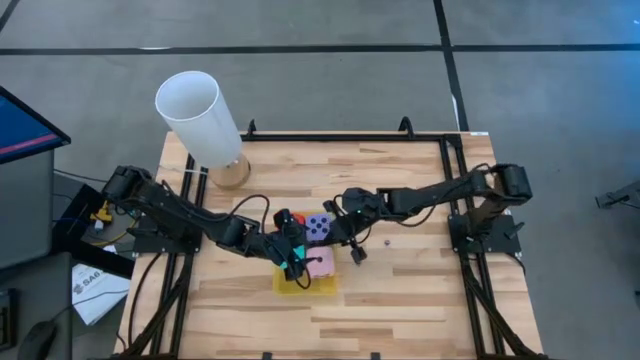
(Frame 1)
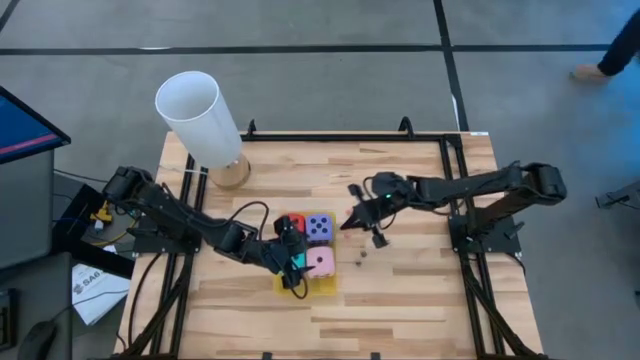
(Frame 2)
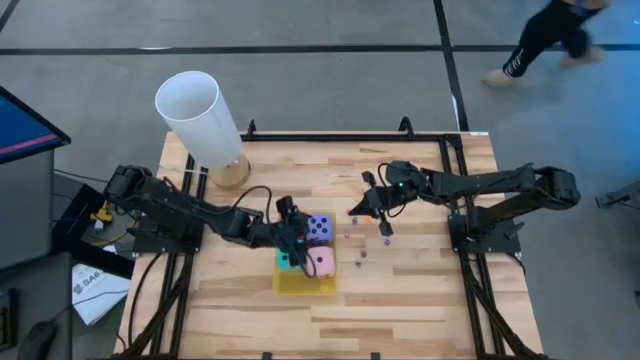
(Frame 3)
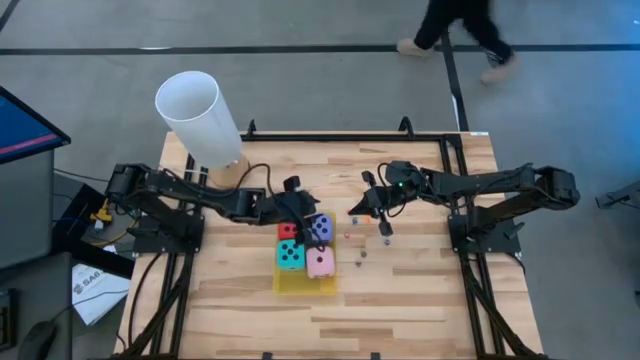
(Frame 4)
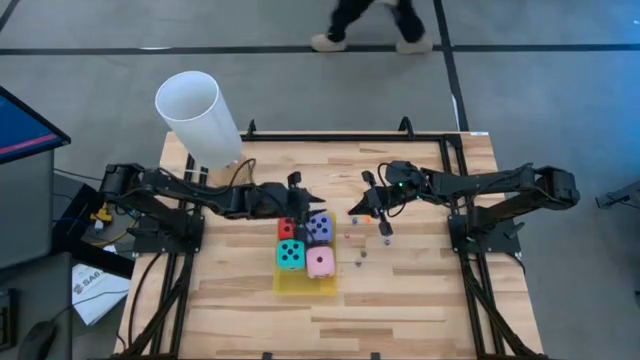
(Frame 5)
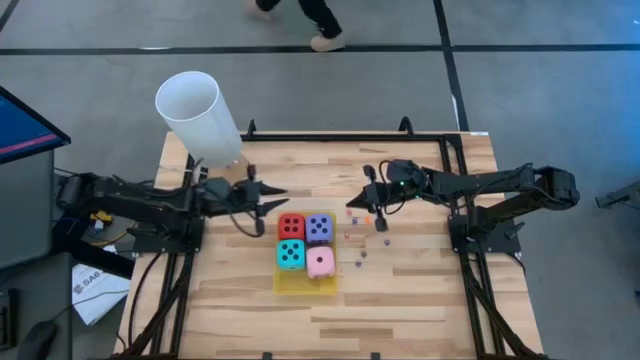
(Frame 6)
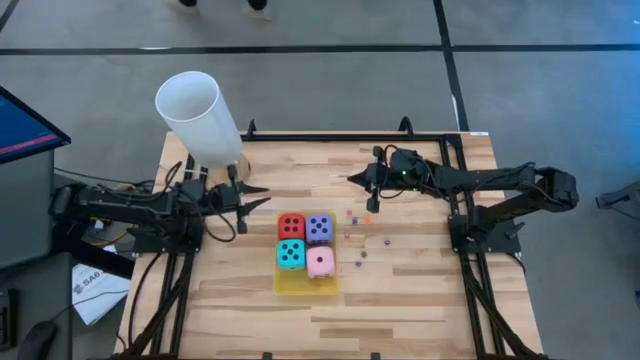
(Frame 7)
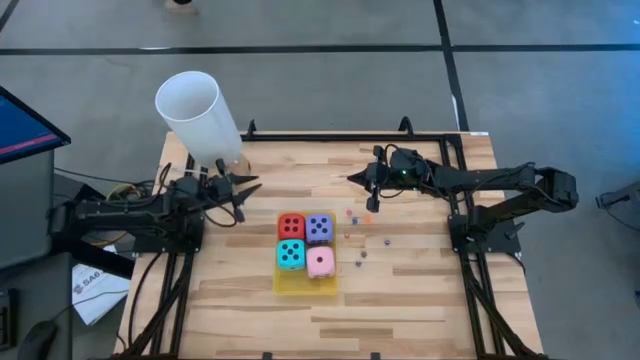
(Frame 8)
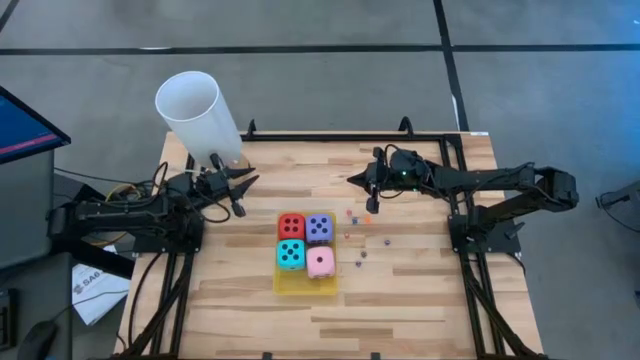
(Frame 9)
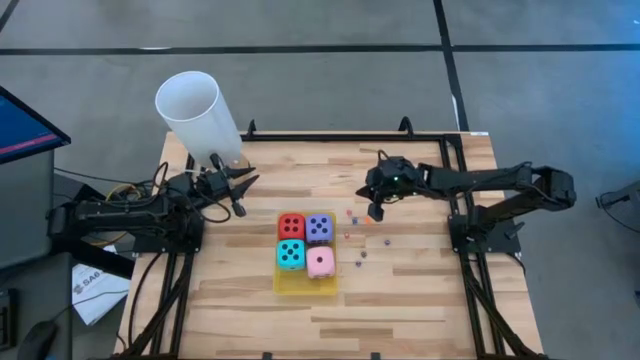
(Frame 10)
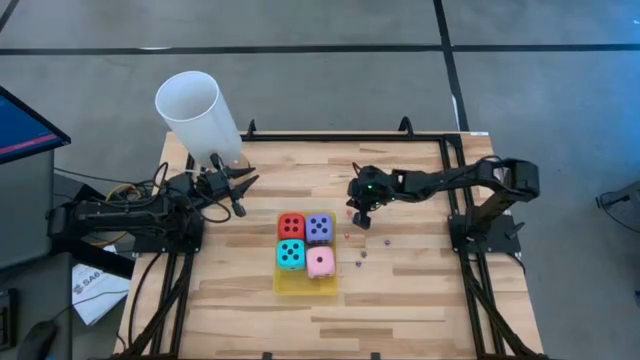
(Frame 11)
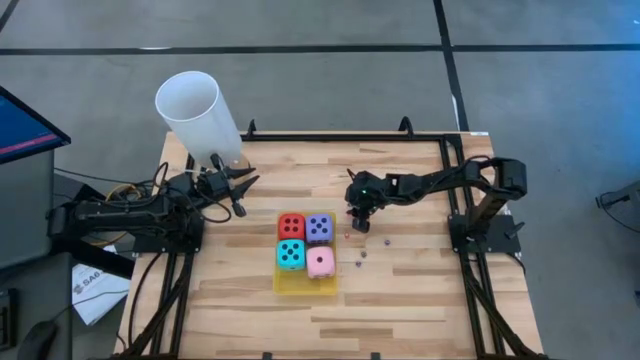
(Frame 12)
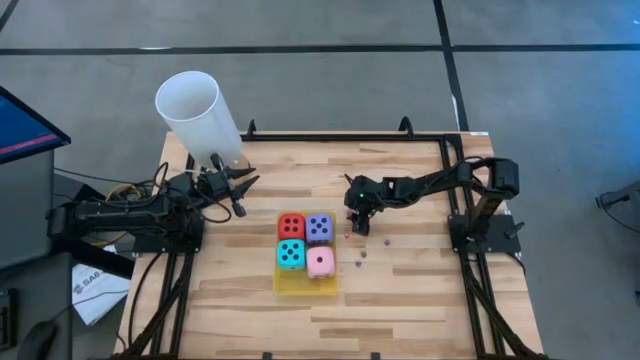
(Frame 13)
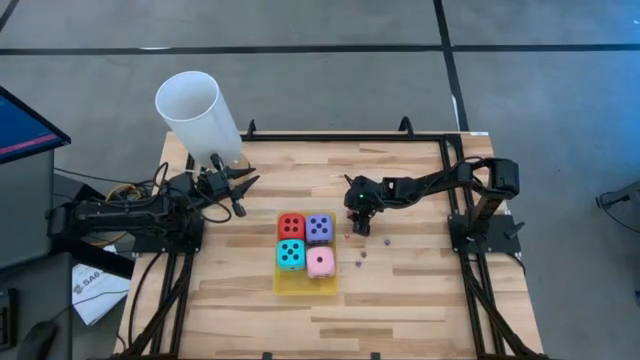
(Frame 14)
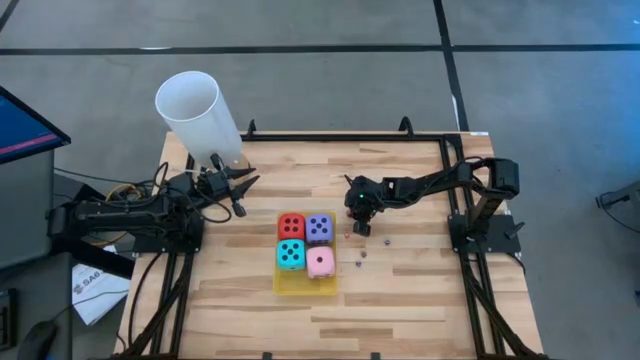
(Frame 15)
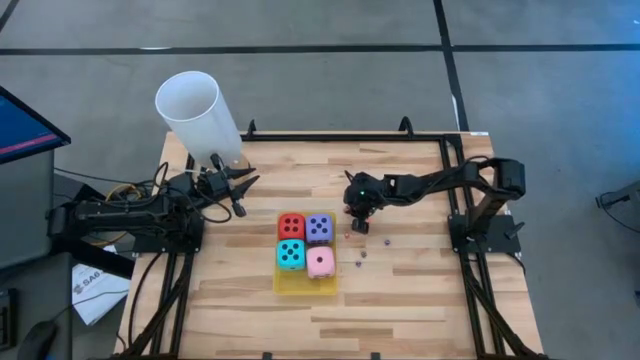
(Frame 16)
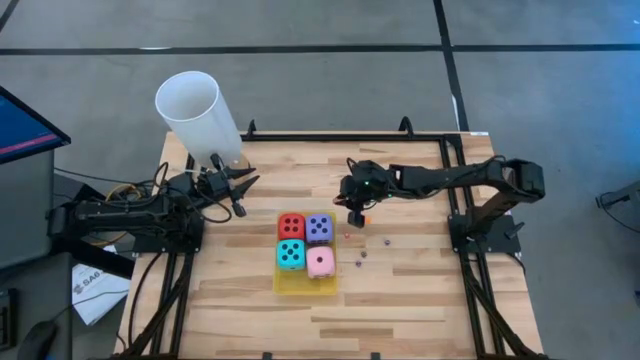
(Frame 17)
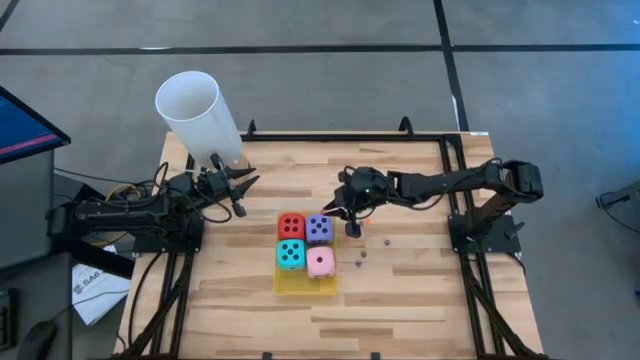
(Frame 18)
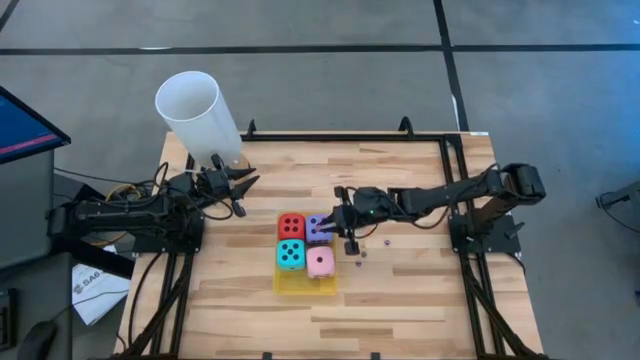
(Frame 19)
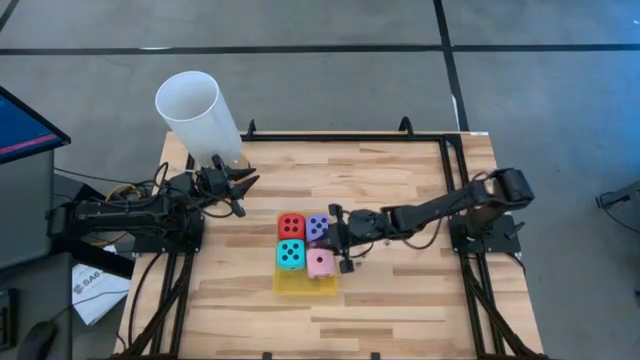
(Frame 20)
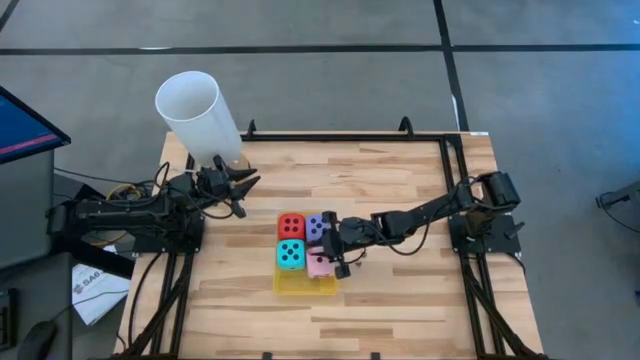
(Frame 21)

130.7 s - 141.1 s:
Task: Pick & Place Dice
Put the red die into the yellow bin

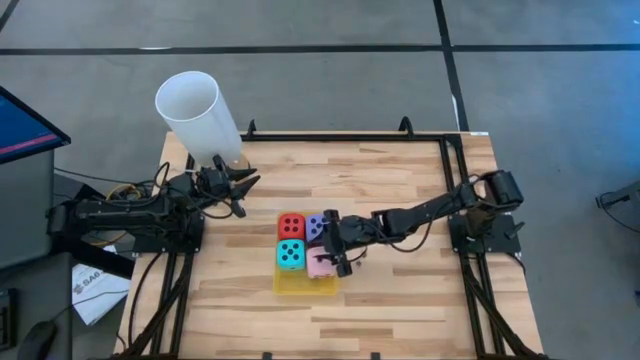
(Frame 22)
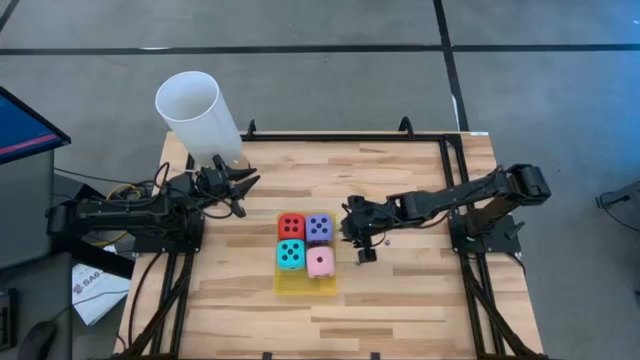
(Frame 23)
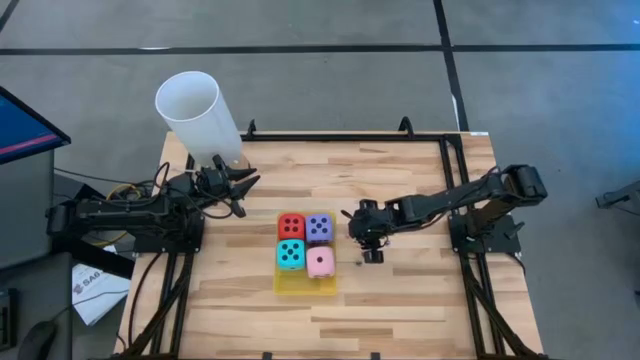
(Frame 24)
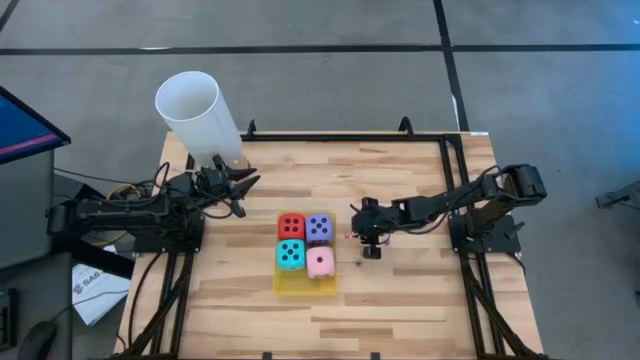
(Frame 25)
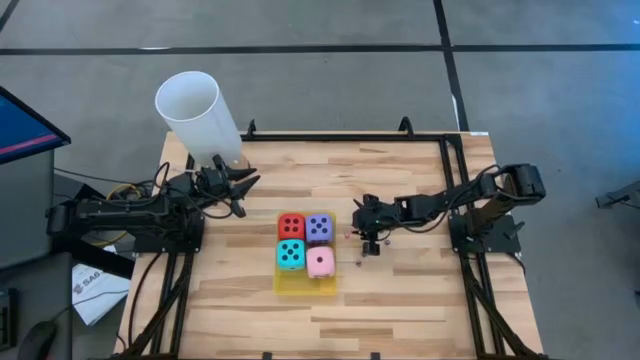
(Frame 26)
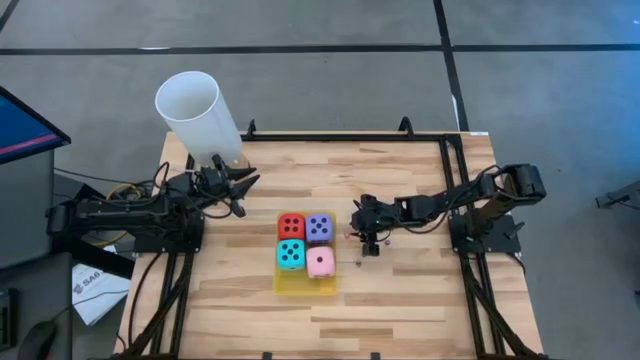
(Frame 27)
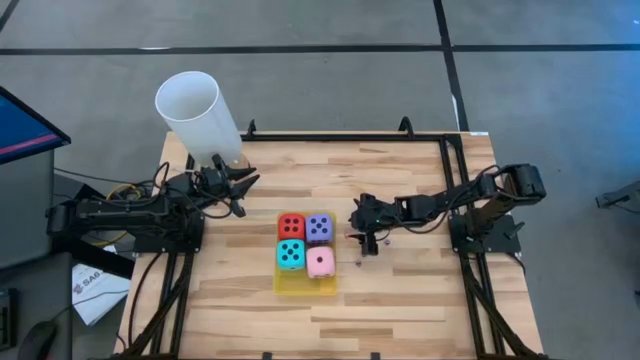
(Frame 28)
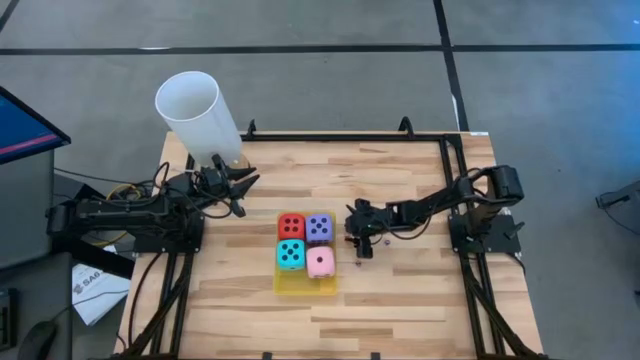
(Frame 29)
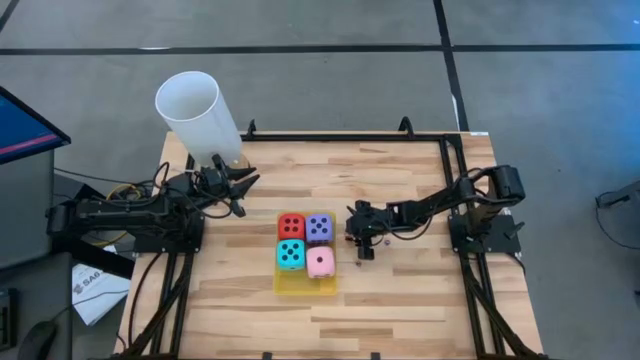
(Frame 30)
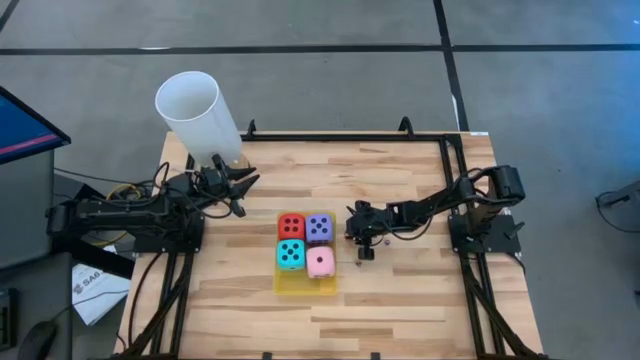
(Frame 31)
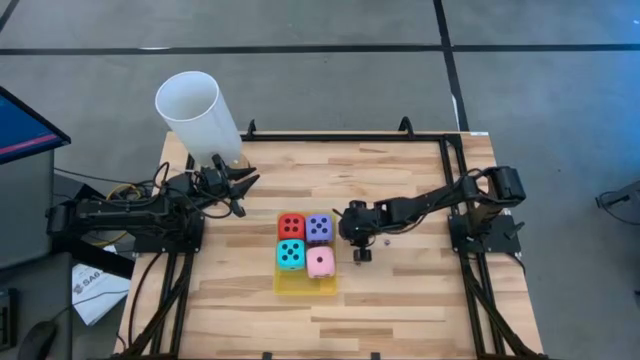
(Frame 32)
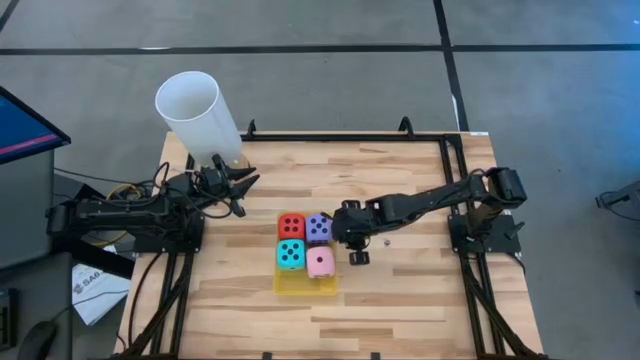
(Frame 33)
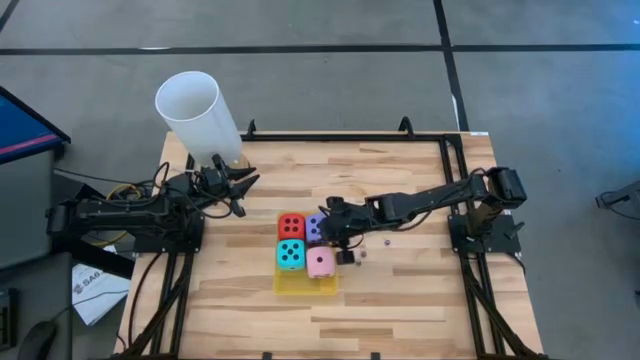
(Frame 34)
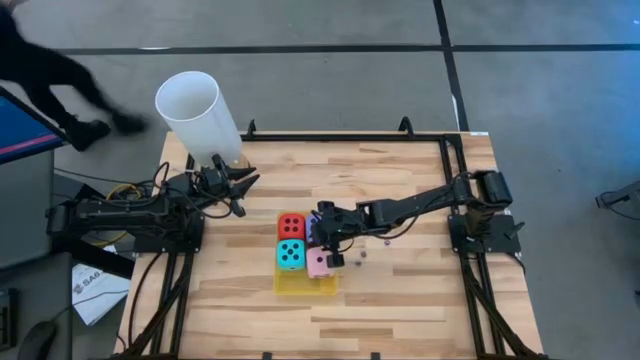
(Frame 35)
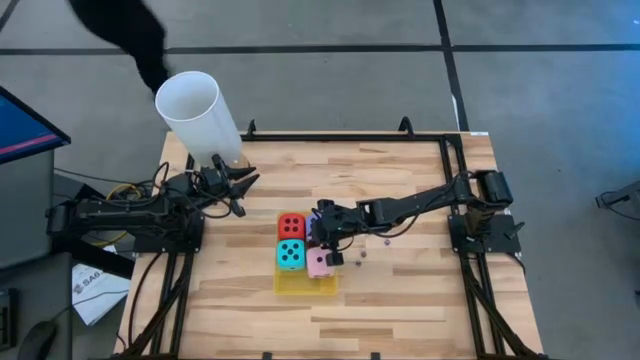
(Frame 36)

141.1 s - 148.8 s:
Put the red die into the yellow bin
